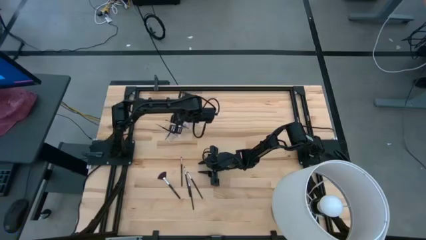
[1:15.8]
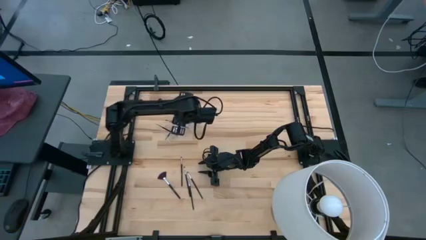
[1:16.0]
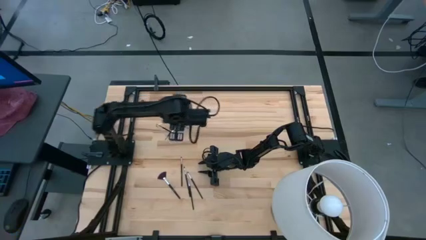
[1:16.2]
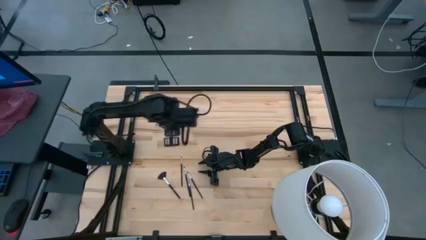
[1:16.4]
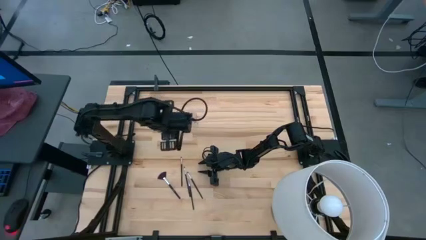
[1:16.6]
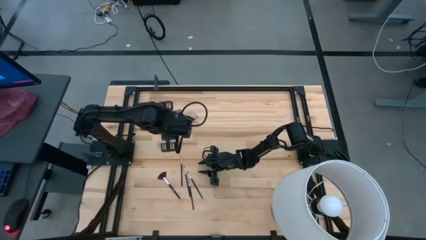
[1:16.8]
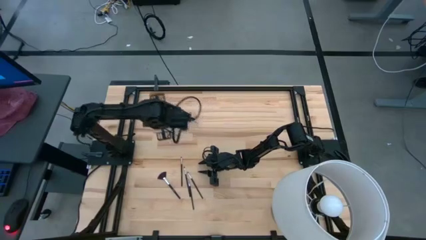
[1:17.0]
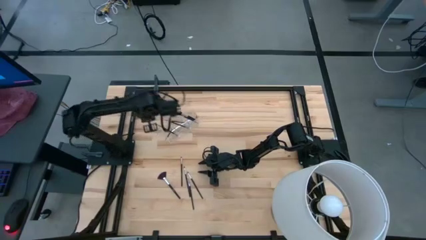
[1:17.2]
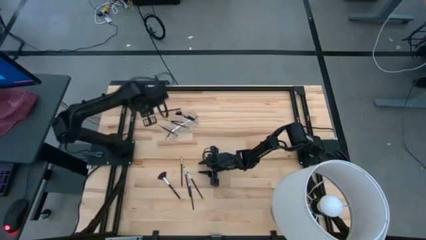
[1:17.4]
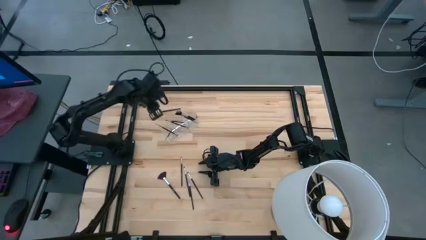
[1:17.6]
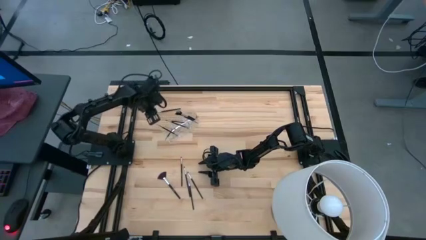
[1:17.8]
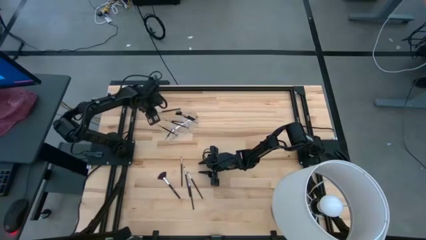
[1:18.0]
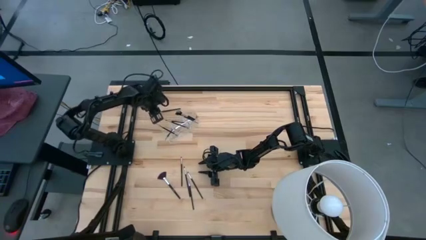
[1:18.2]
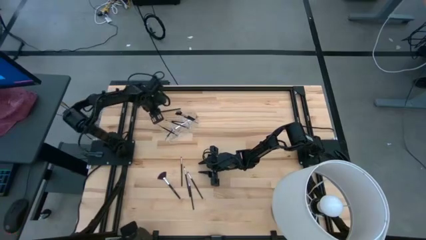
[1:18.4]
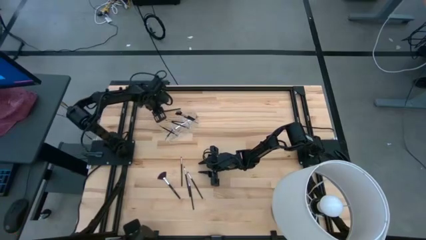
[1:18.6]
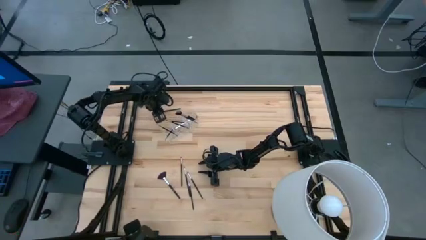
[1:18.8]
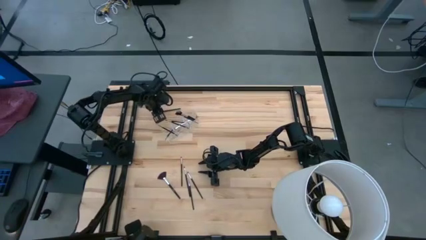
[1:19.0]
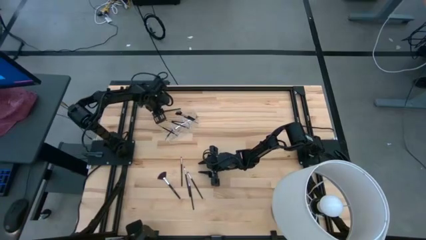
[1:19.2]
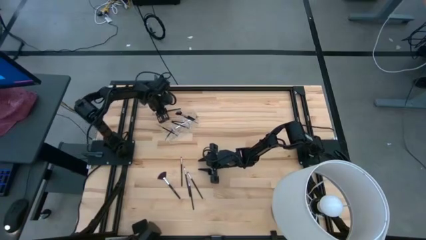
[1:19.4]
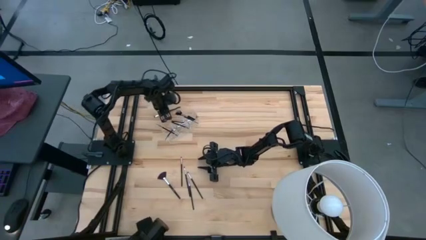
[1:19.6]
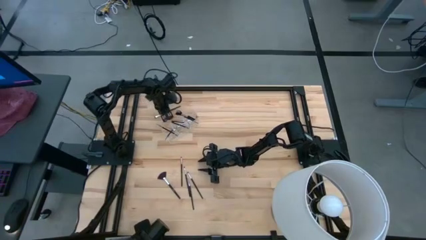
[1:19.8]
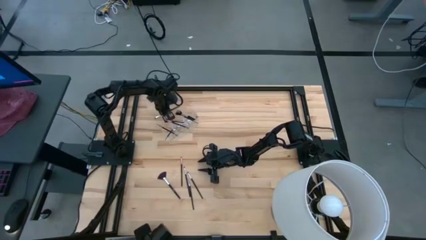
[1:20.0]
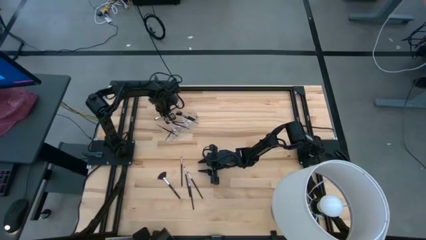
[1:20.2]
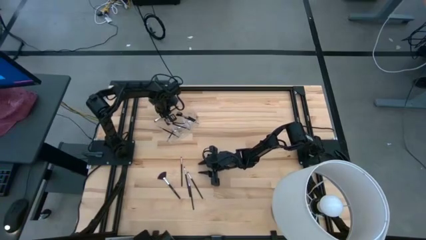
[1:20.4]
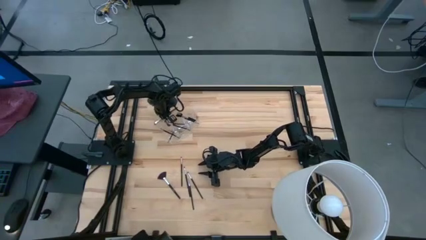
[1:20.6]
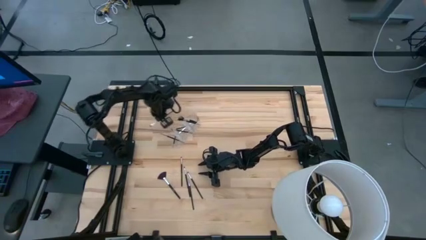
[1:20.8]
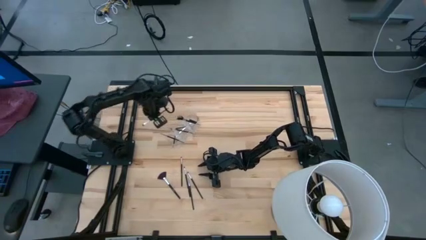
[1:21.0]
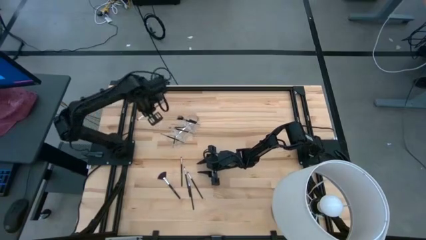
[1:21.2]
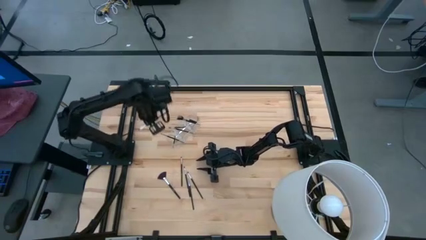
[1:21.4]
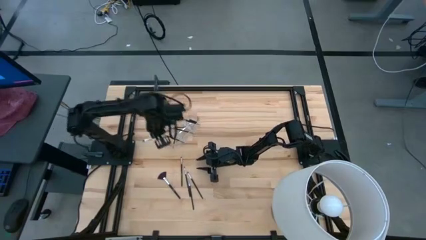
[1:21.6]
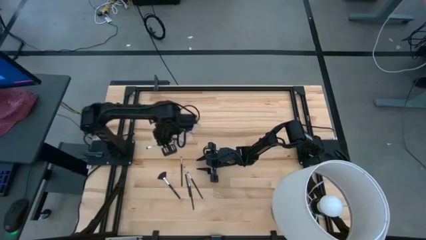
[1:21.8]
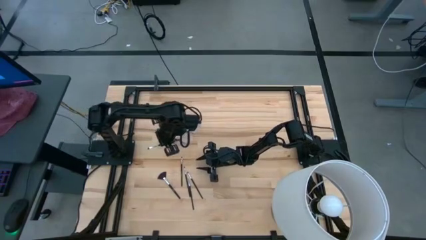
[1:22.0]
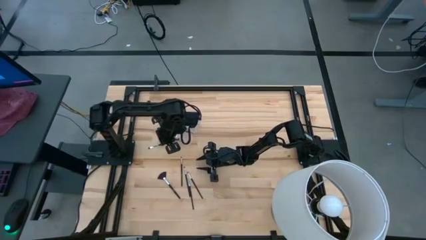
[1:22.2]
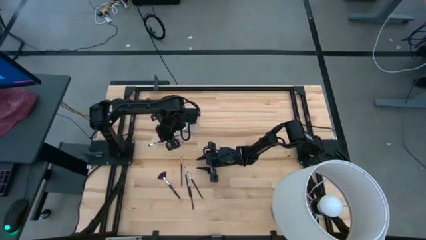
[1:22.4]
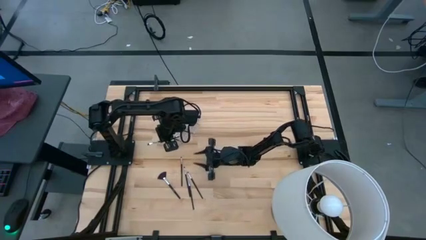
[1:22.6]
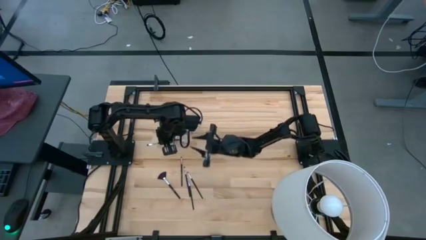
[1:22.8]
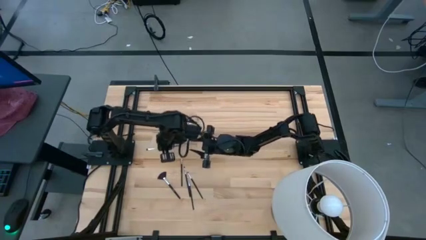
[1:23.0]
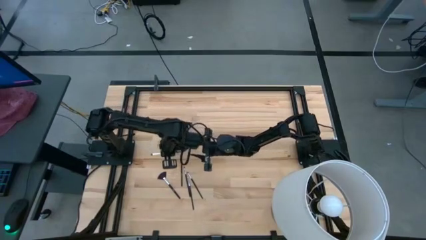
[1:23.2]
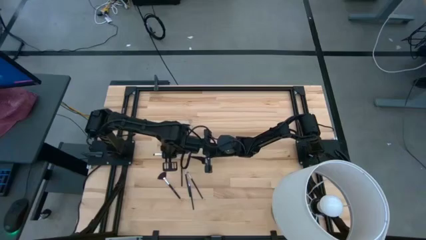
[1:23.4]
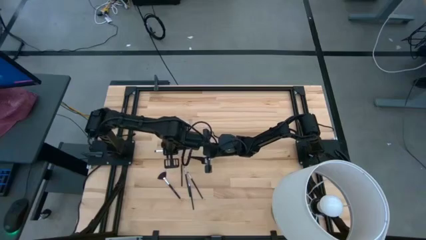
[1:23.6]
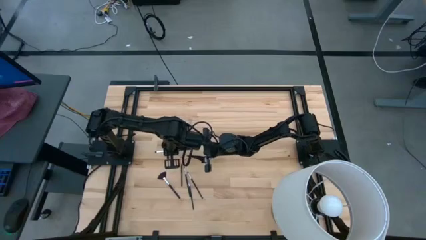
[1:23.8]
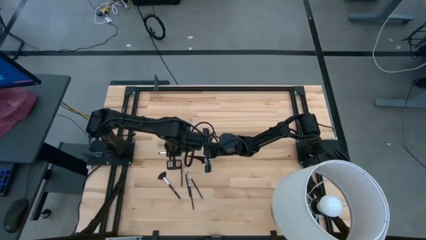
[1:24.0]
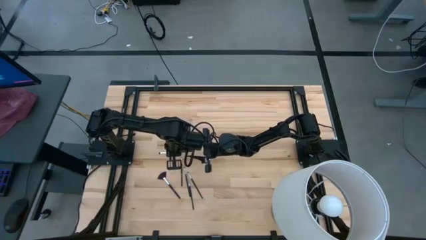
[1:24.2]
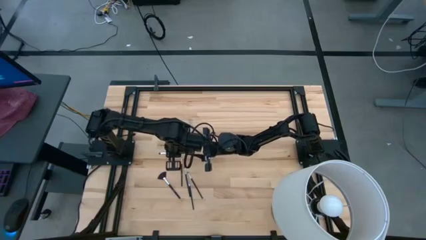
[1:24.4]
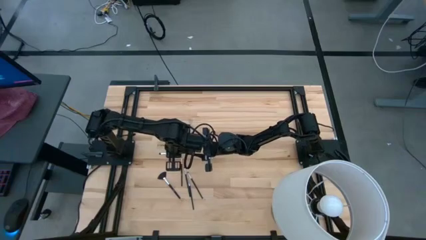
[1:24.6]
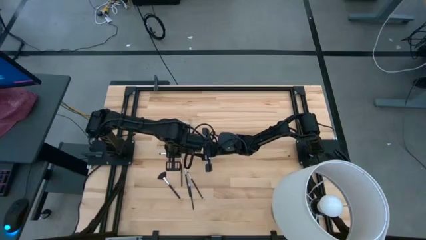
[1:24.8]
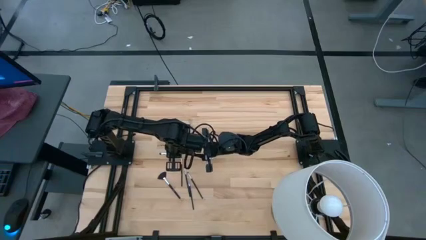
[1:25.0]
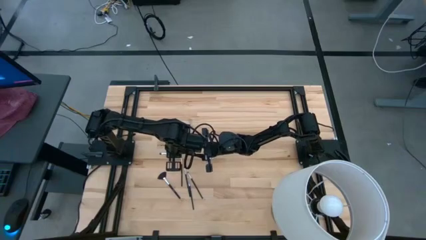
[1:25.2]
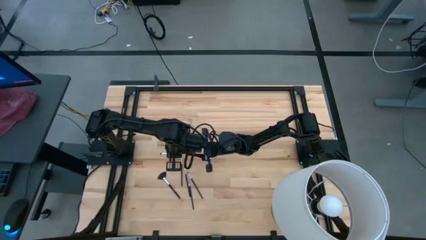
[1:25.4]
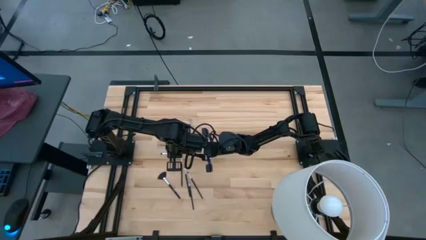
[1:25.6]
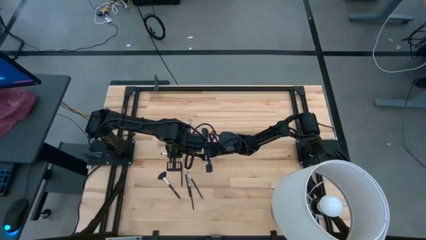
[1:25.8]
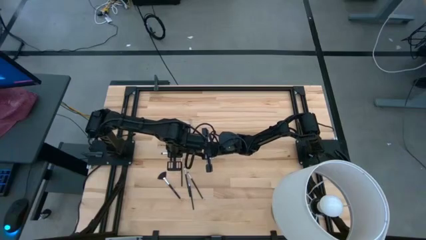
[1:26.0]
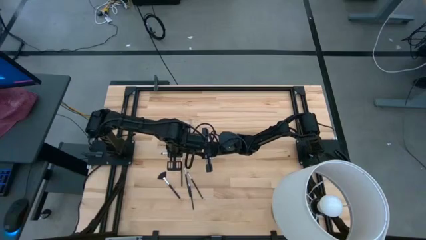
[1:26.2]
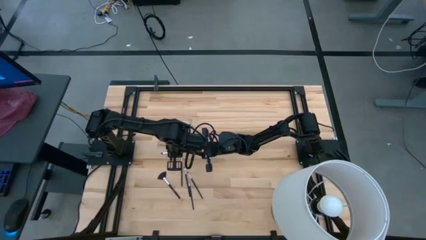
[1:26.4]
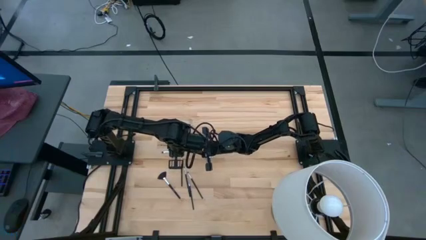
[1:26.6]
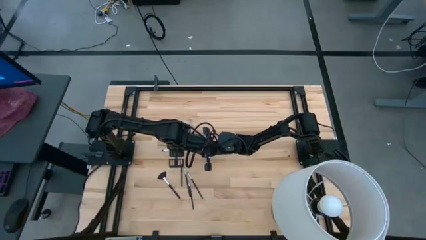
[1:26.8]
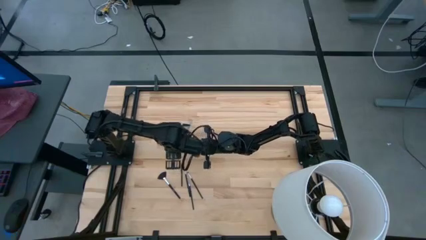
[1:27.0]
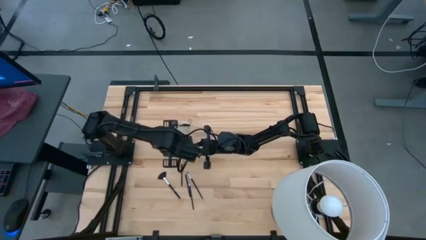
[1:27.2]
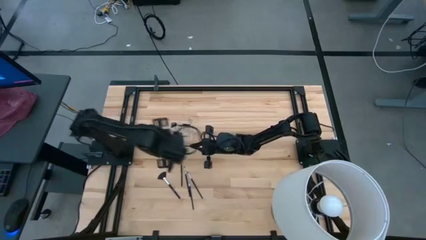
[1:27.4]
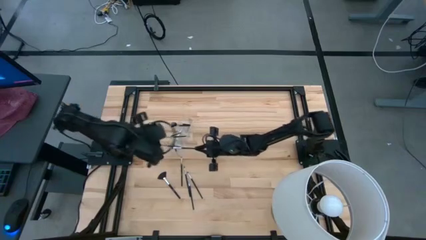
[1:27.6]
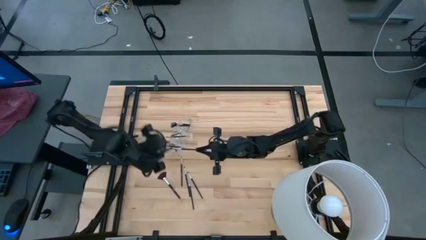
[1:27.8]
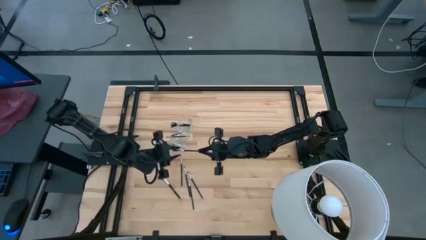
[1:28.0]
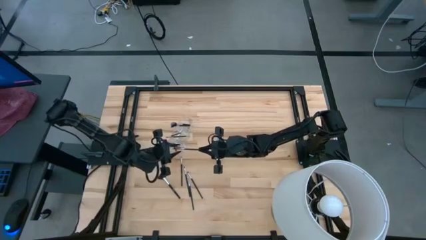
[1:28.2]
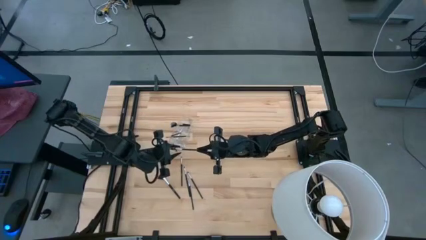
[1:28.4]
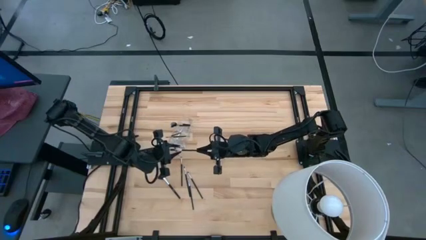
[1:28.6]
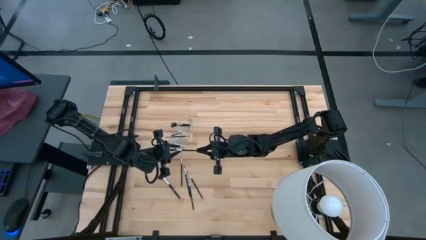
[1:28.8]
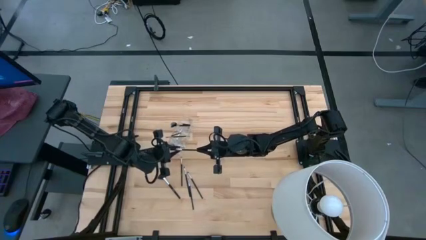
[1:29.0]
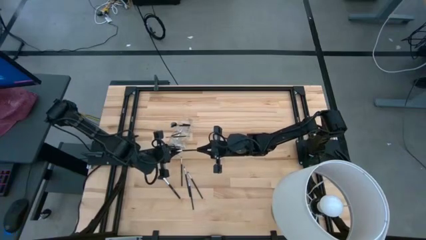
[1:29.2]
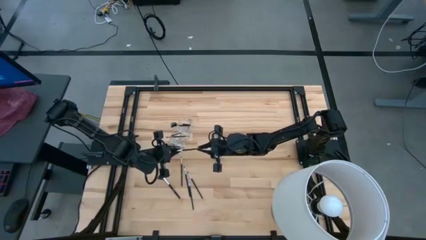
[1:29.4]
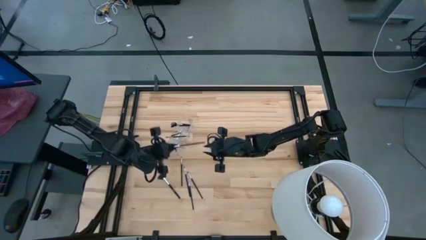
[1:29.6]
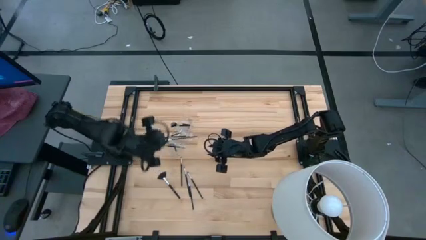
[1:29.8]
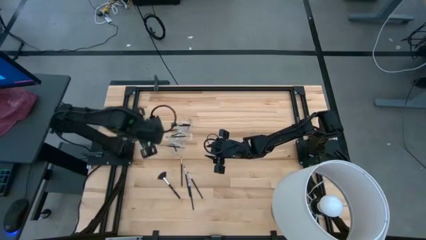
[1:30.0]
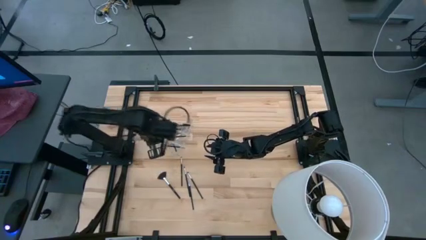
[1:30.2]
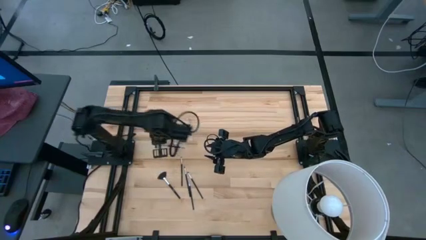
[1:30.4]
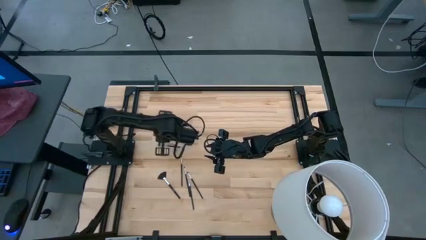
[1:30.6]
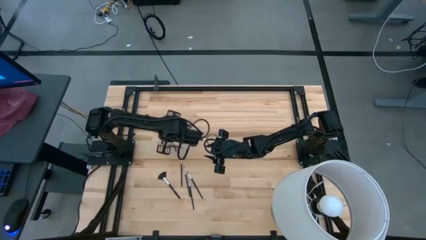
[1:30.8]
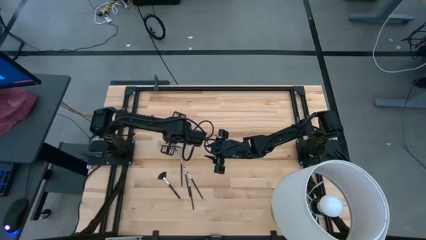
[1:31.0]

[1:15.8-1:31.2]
Task: Put items in baskets/containers
Put the eyeshadow brush into the middle section of the transparent organizer

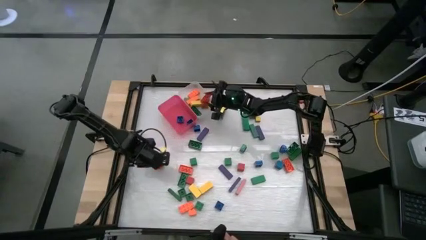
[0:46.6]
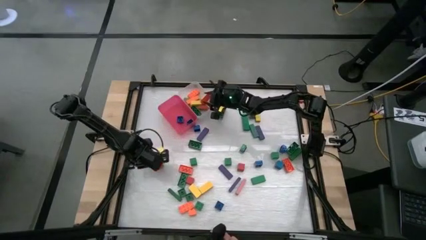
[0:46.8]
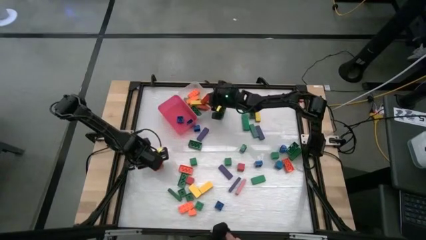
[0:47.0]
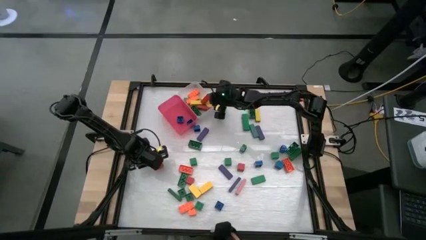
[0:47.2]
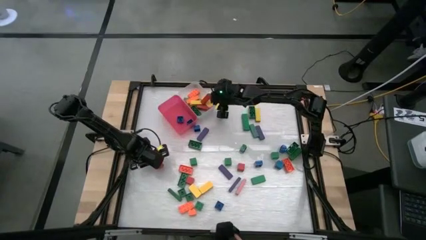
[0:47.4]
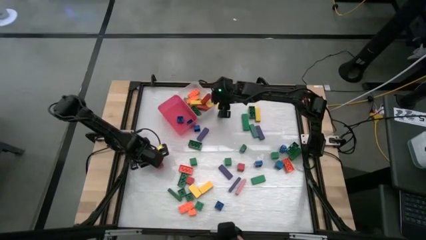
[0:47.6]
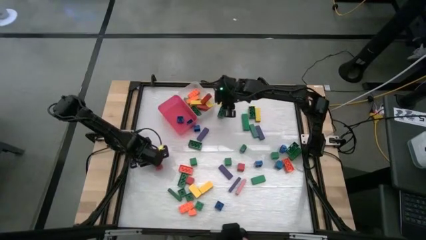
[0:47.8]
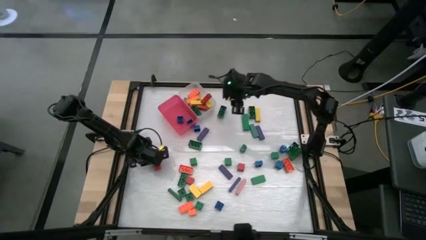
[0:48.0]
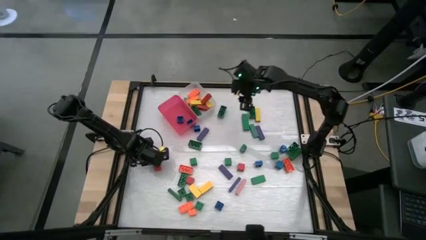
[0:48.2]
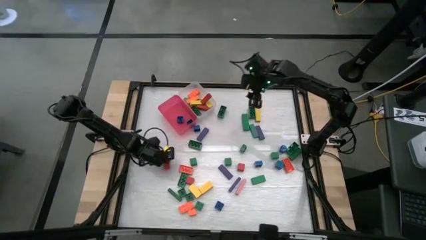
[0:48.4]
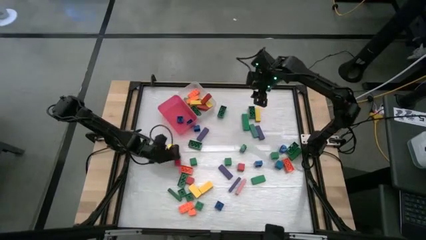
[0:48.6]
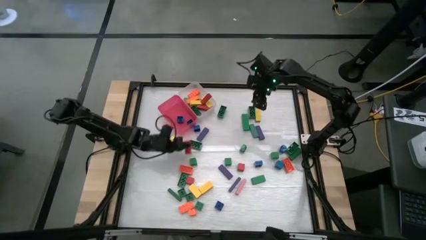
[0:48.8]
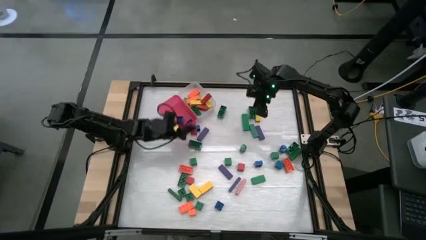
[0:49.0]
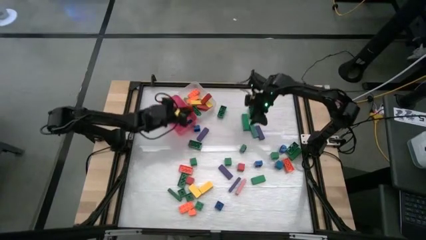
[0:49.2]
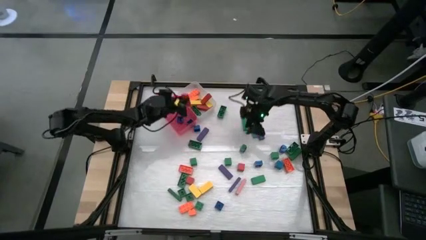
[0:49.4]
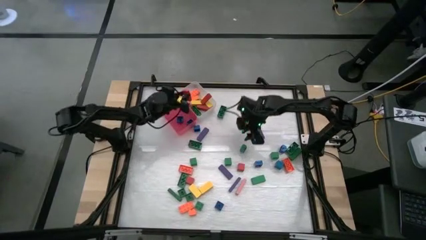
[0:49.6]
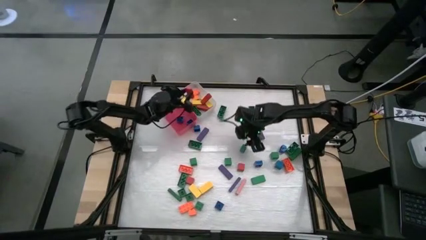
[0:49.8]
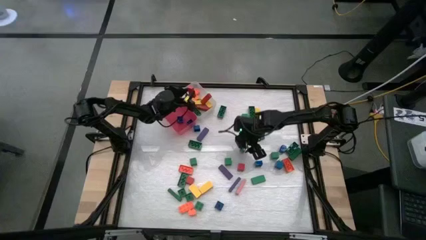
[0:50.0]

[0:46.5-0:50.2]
Task: Sort blocks by size
Put the big red block into the white bin
